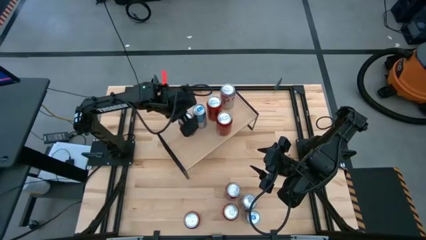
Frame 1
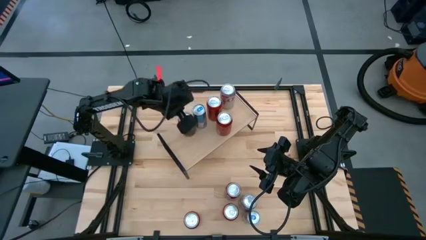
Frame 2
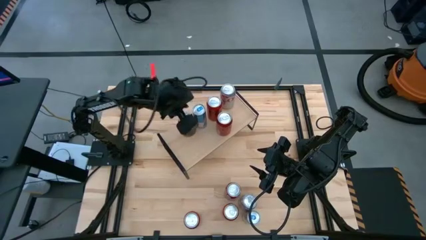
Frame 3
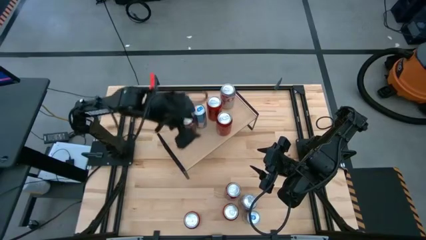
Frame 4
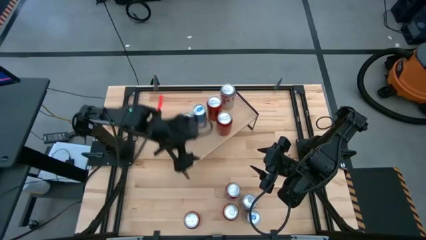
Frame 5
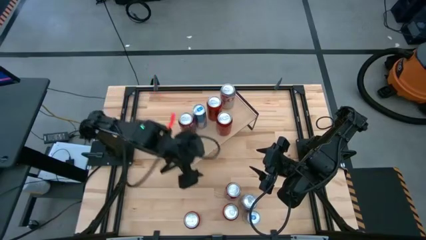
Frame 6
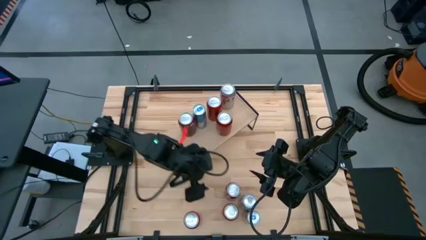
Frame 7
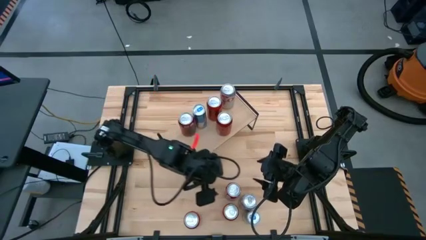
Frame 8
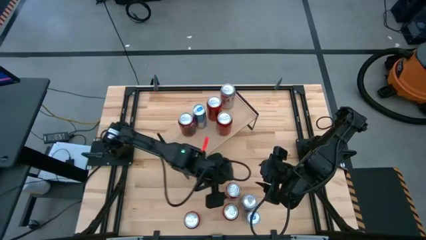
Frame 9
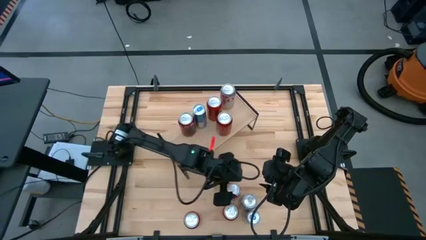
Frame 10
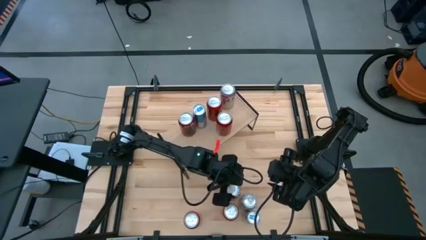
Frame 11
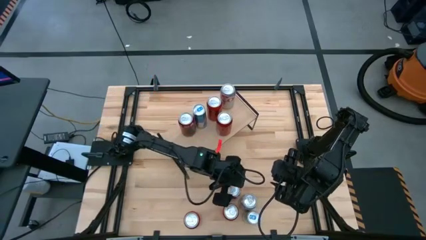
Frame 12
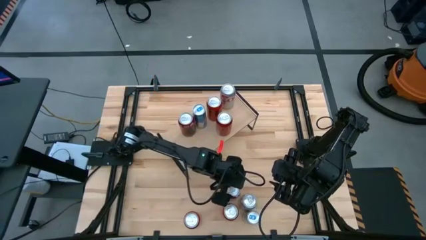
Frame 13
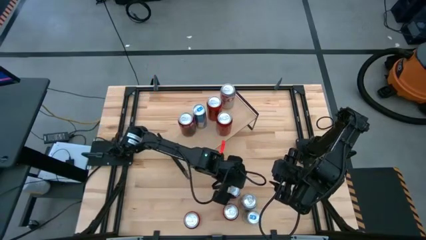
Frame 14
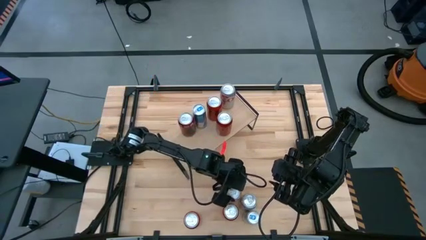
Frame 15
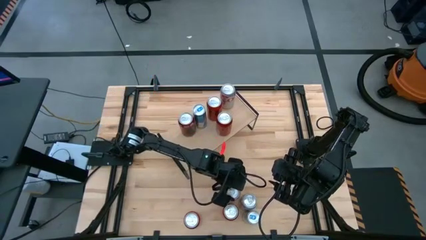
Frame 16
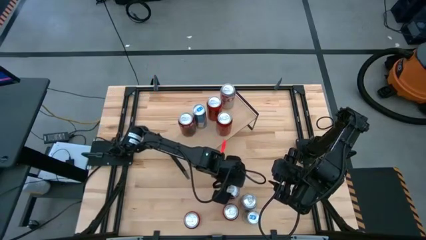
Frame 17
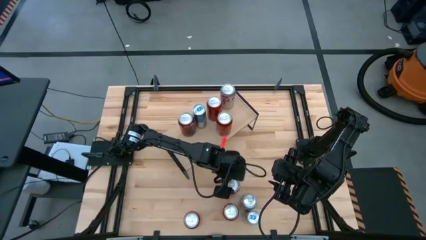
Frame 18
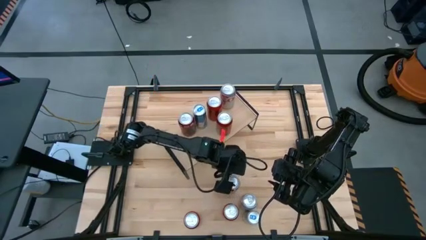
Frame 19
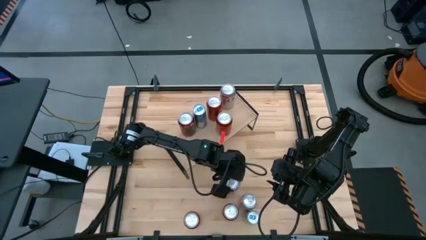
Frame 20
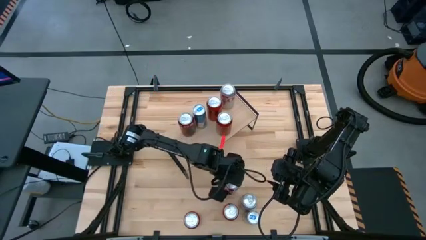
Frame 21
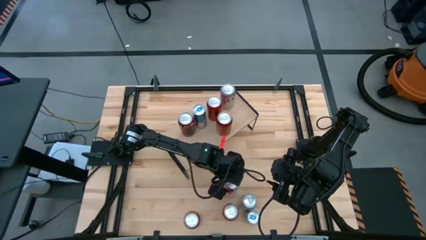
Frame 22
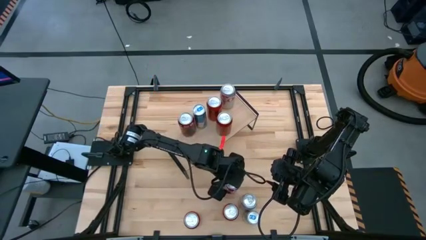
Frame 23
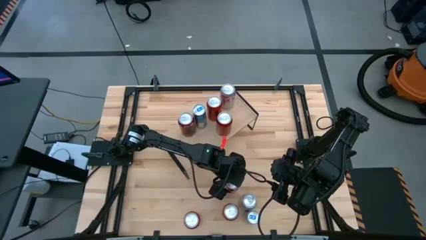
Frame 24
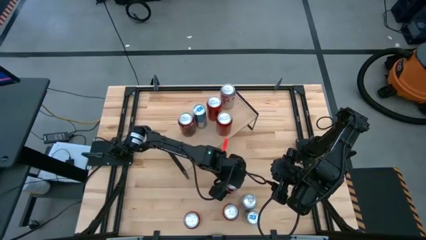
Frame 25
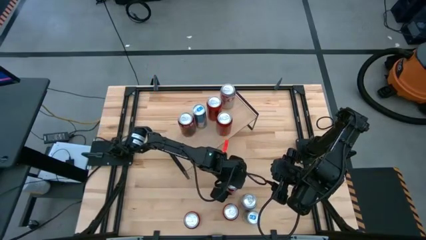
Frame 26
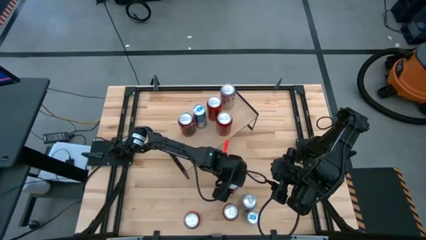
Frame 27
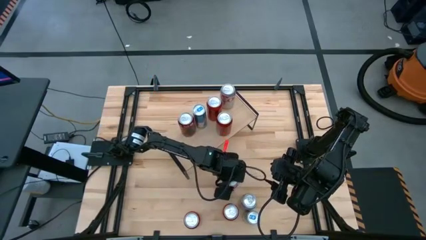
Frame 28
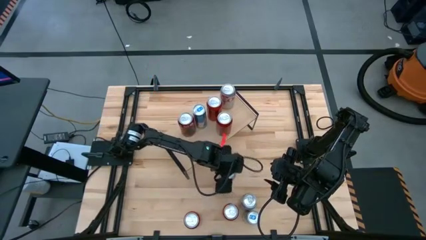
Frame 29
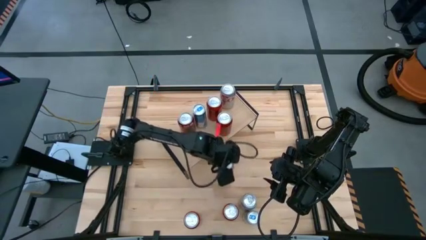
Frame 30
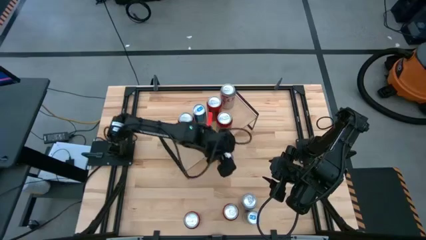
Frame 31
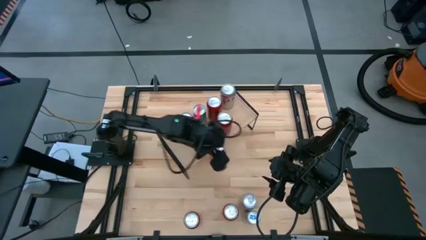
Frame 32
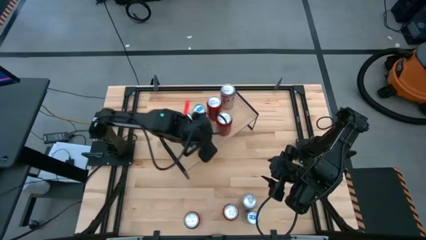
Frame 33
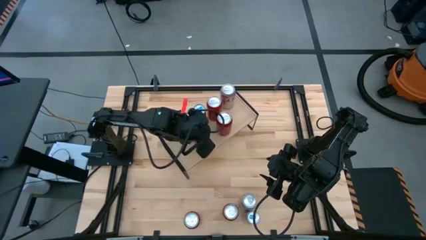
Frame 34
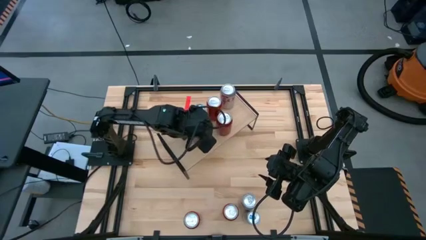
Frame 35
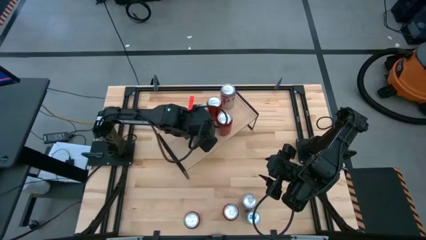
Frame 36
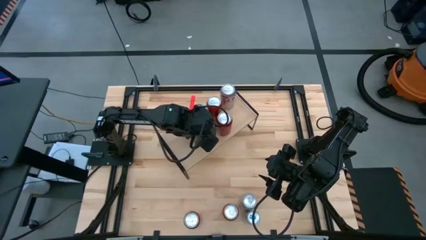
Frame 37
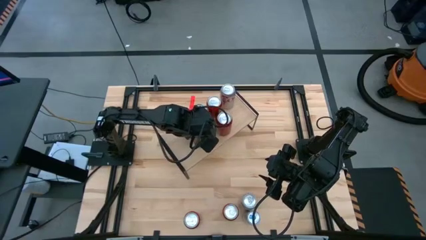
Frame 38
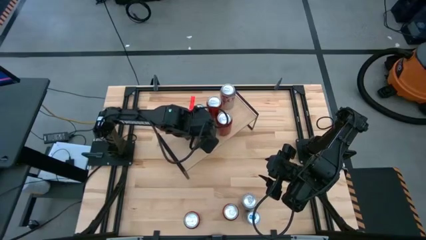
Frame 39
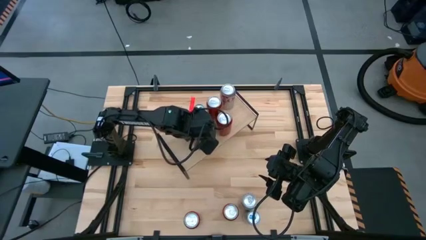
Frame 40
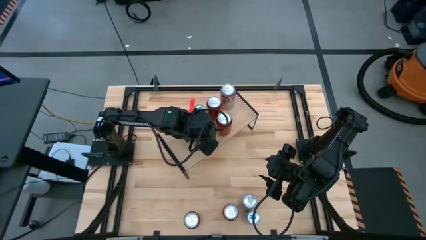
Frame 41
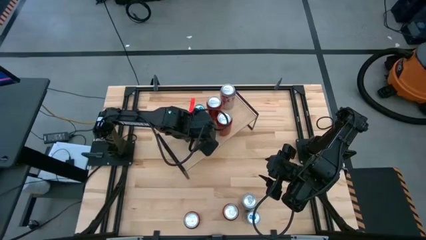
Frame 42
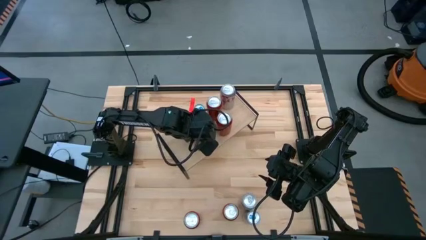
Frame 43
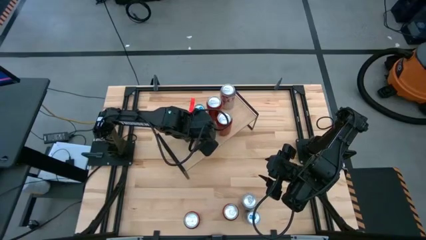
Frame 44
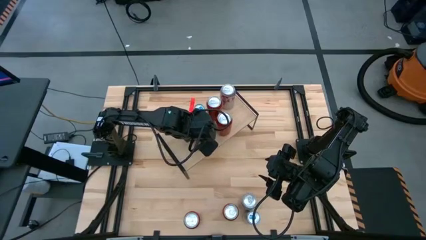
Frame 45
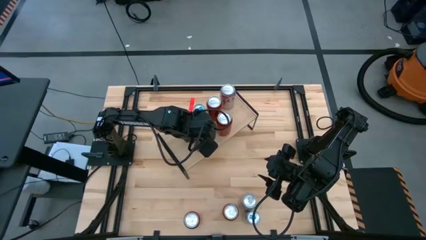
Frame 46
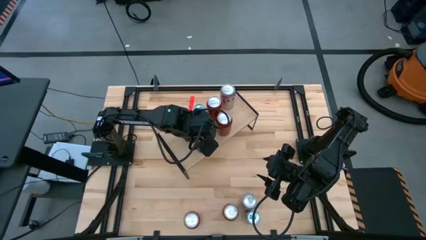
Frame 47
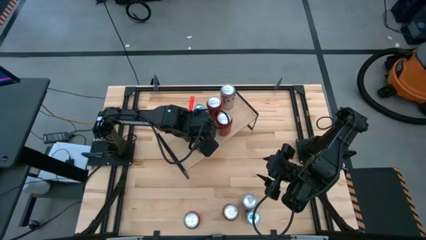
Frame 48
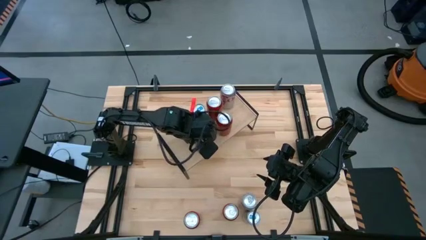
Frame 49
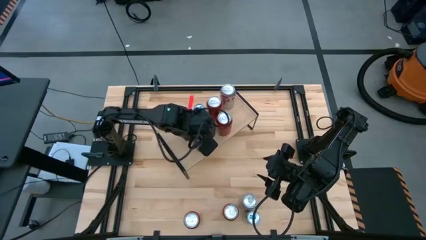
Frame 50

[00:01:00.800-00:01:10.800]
Task: Place canned beverage on shelf
Put the red-white soda can on the shelf aligned with the other red-white soda can

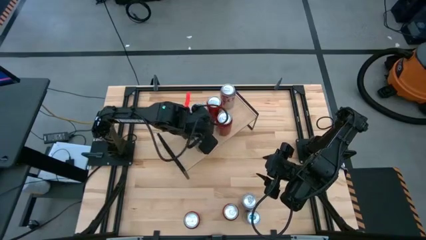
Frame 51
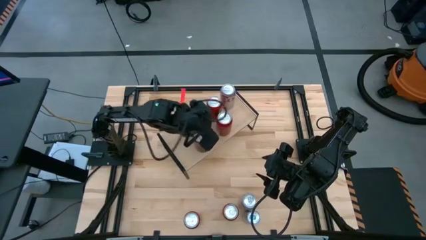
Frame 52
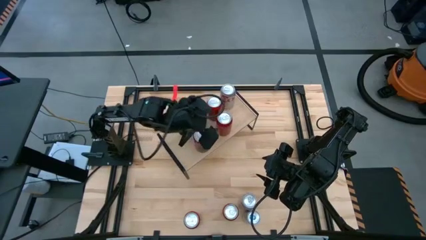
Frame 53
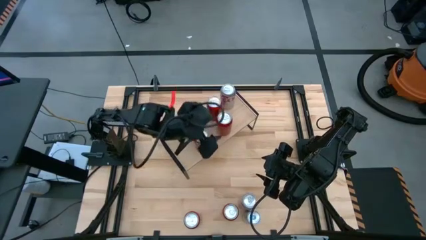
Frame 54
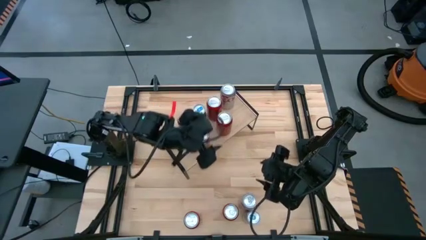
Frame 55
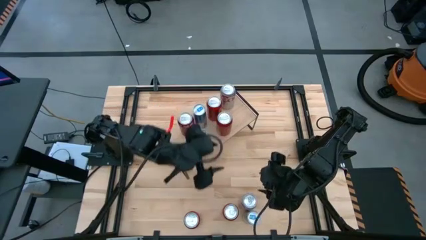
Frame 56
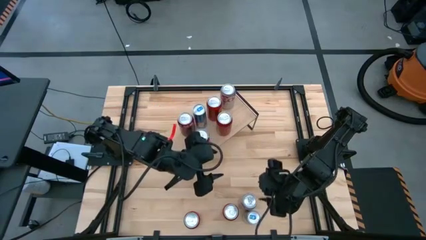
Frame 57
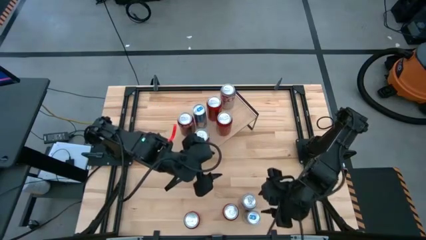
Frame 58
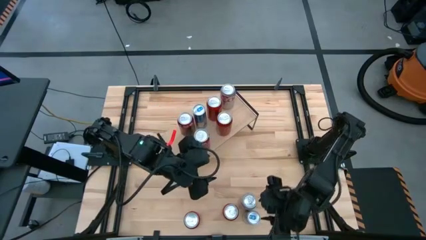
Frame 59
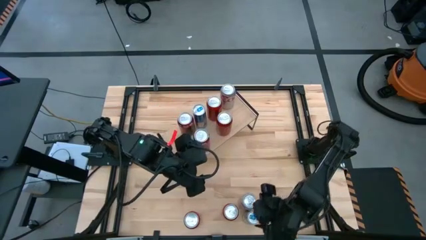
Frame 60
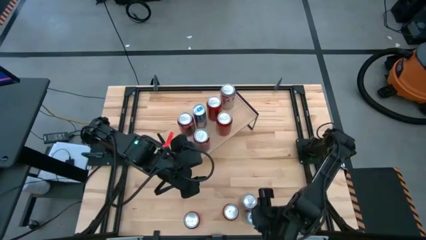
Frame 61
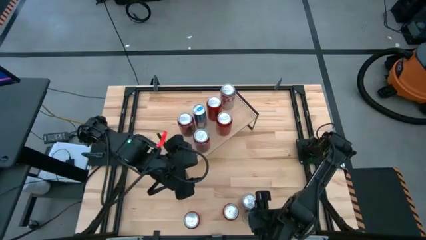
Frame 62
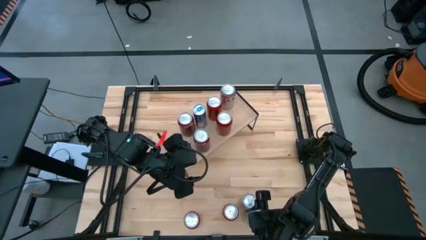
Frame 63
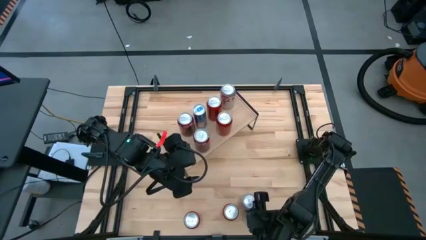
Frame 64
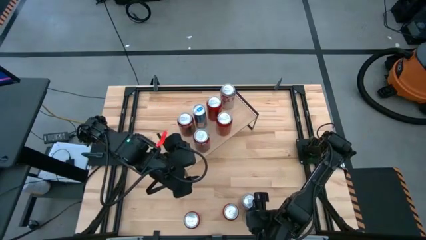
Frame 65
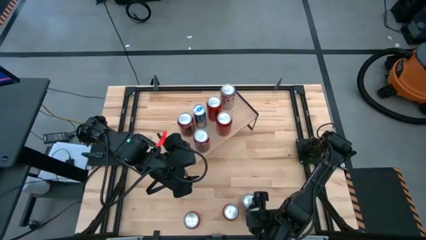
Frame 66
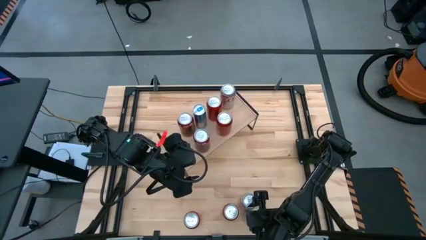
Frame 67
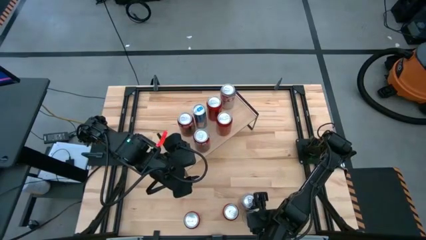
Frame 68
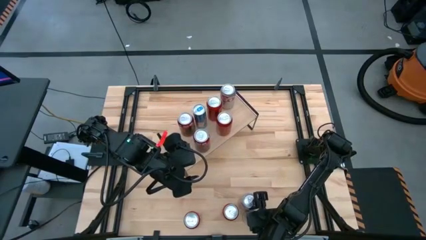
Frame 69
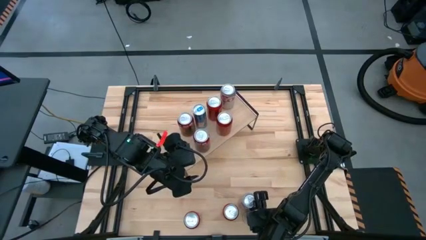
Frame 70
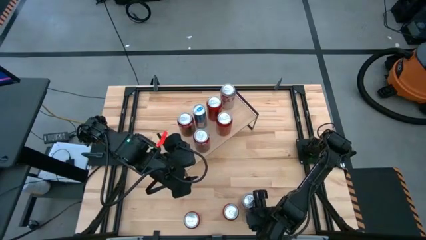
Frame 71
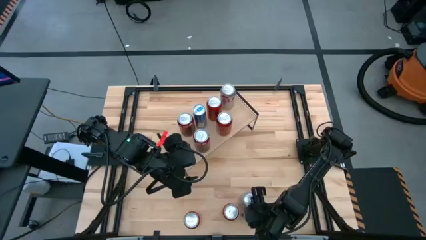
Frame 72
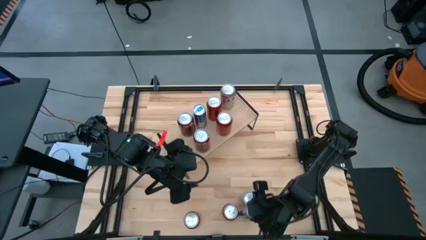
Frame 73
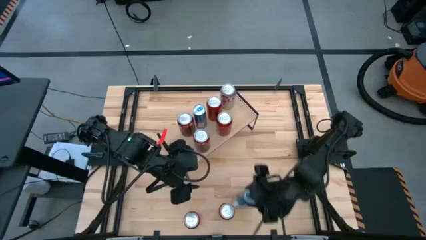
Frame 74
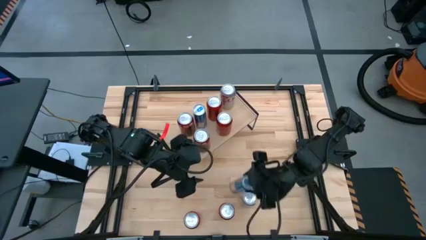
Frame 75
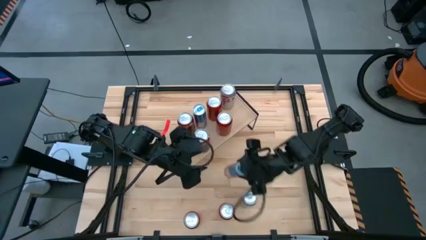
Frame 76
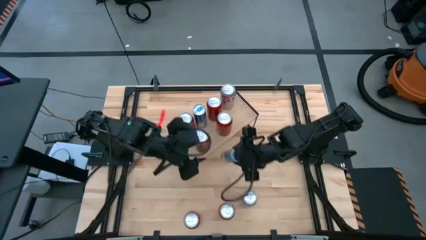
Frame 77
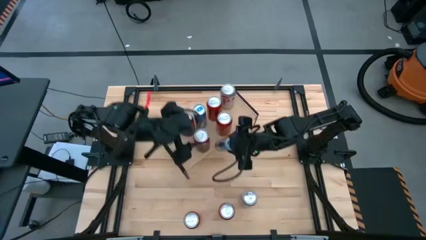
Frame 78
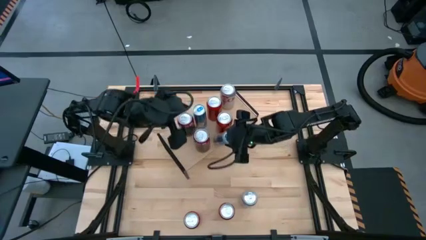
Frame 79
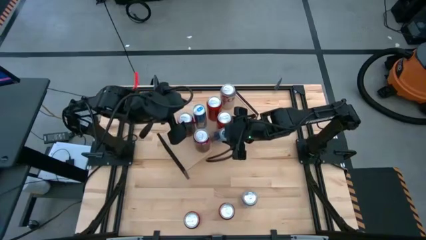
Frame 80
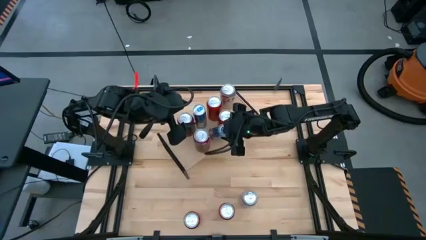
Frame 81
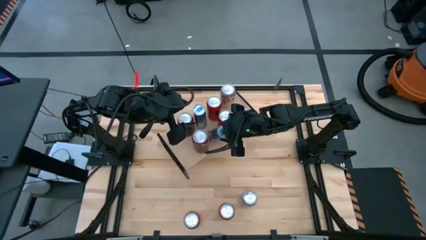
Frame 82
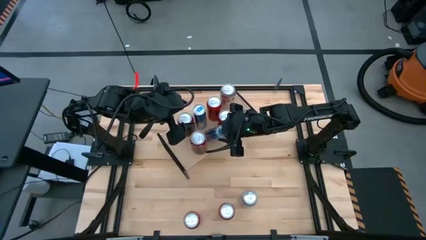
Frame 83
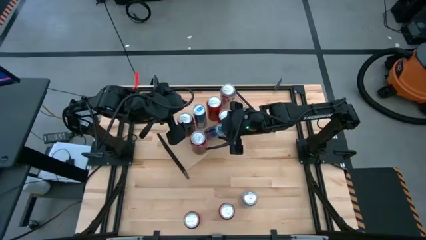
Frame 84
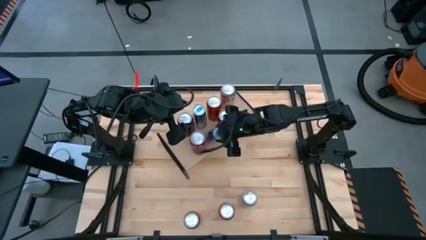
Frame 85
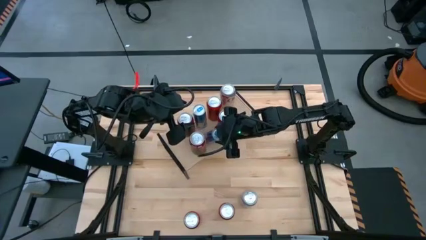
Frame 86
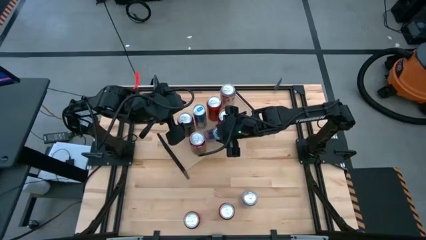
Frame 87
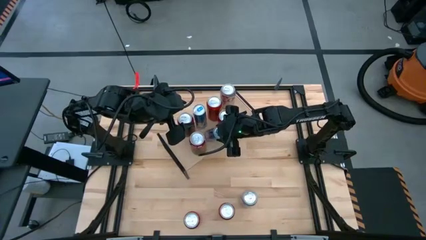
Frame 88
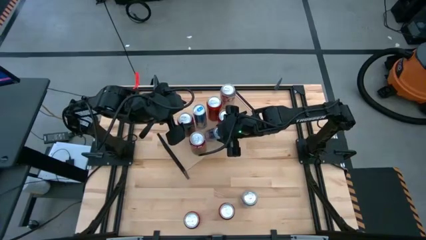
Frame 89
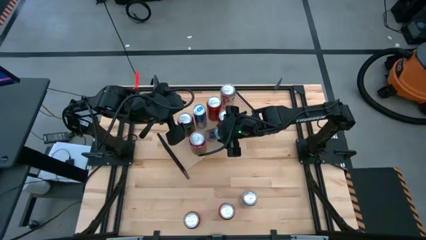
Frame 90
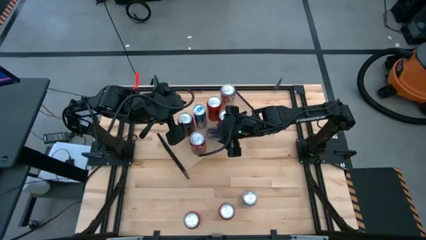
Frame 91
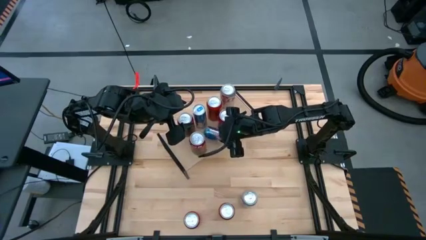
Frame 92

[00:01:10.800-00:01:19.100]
Put the blue soda can on the shelf aligned with the other blue soda can
